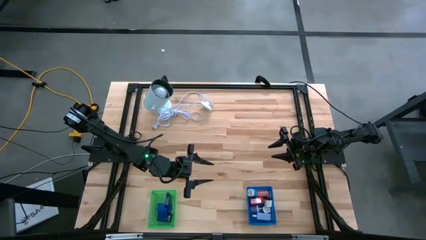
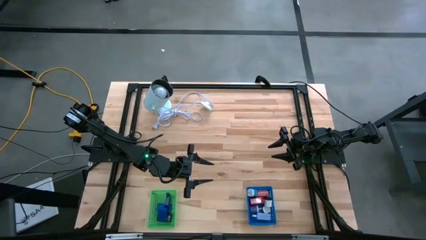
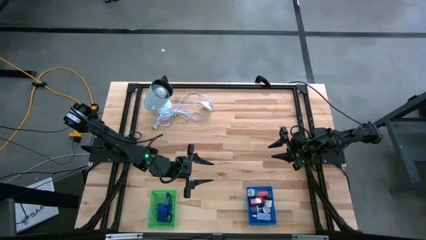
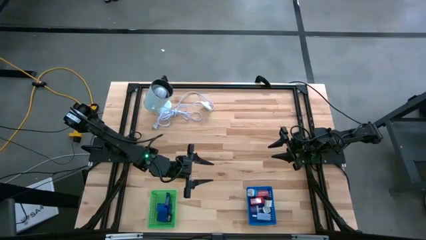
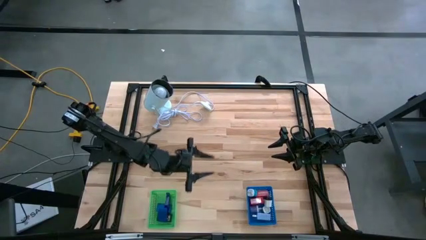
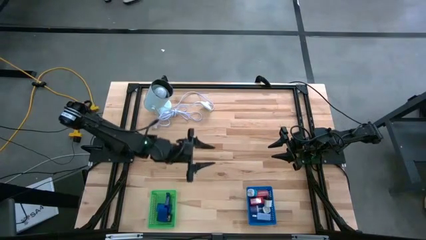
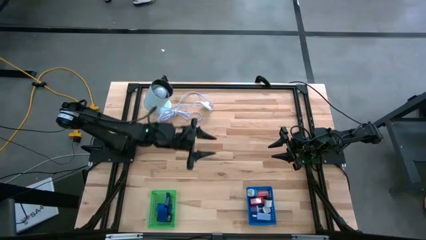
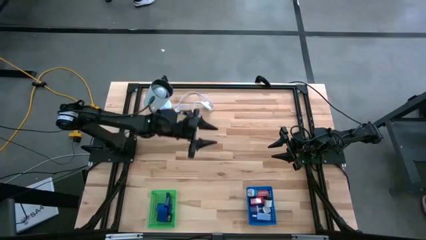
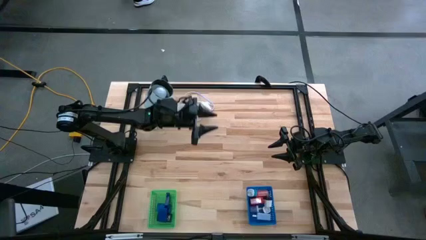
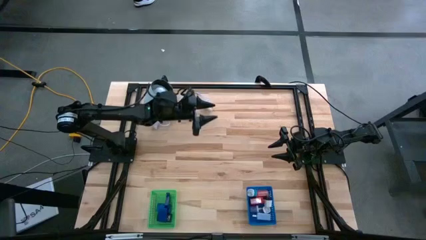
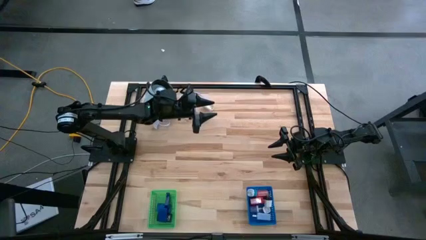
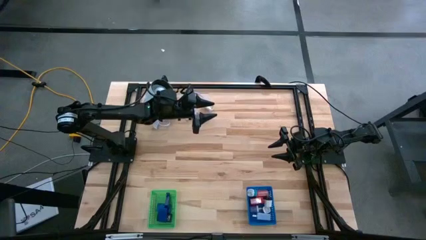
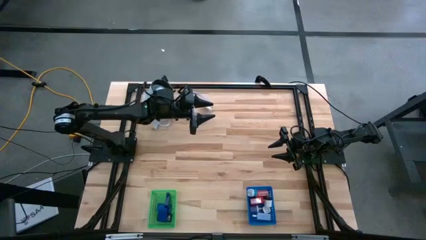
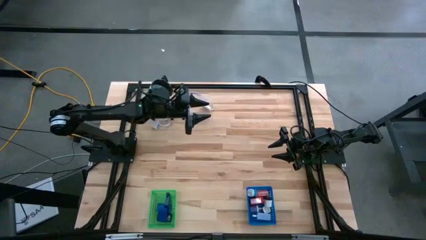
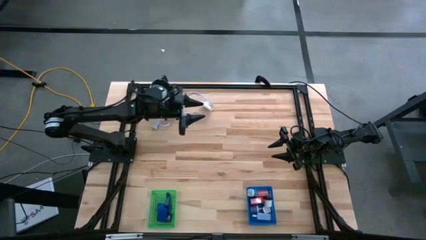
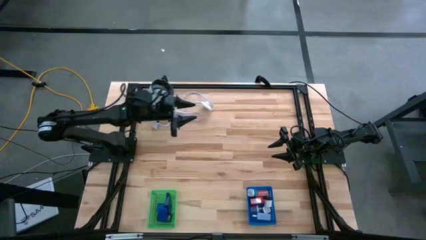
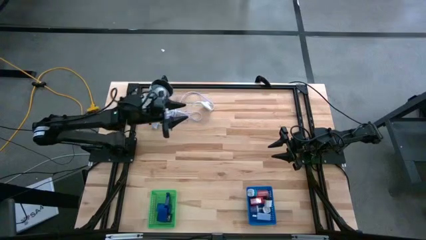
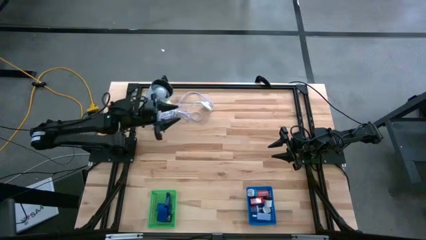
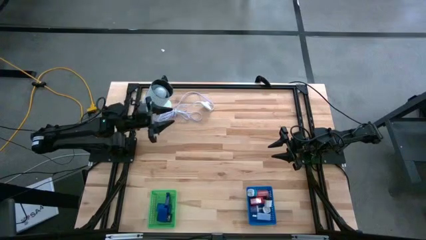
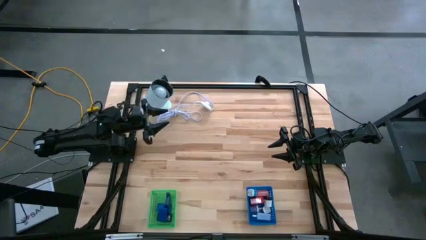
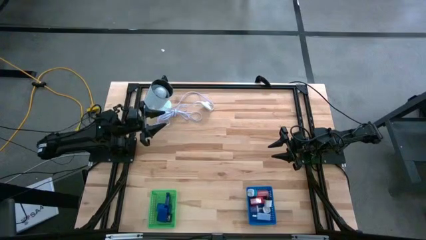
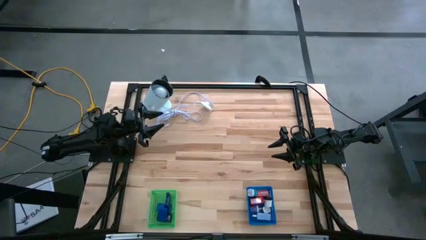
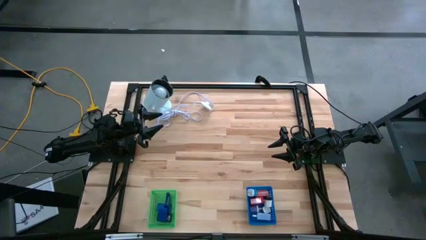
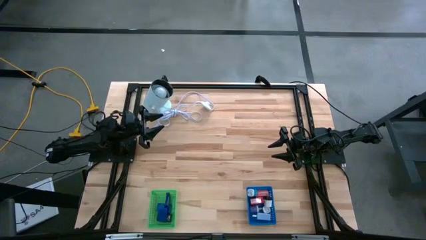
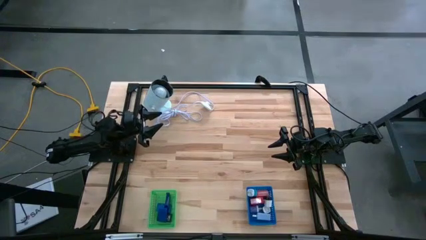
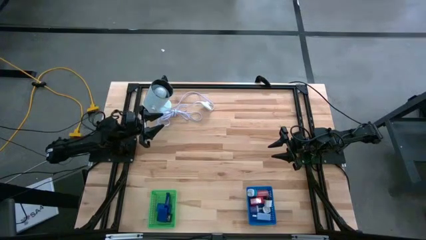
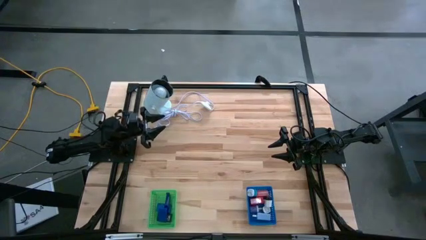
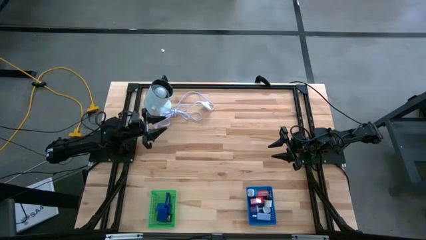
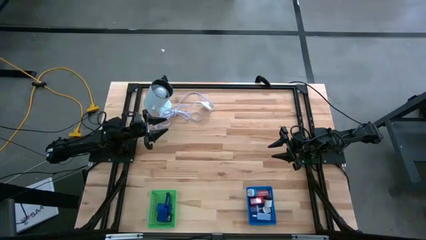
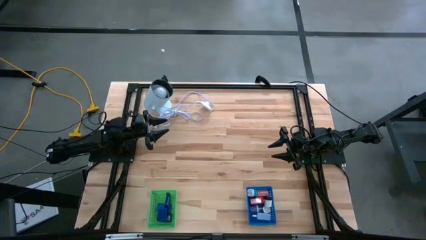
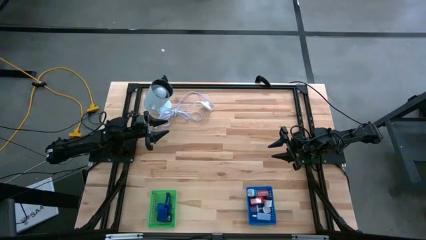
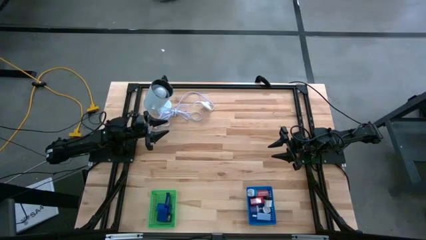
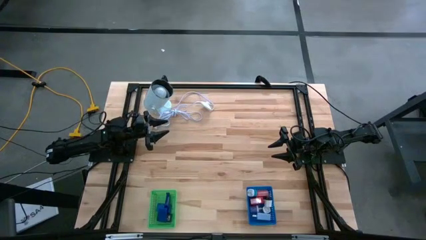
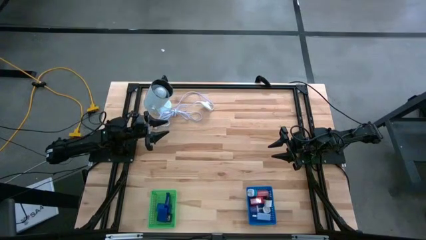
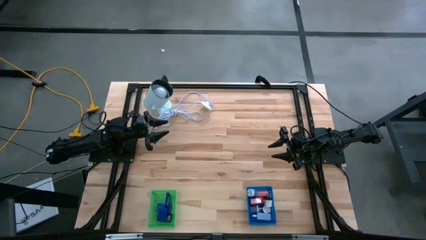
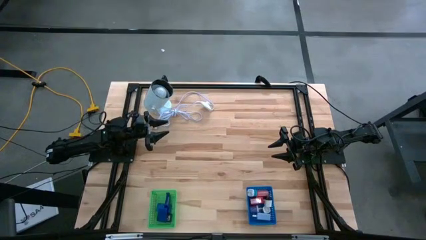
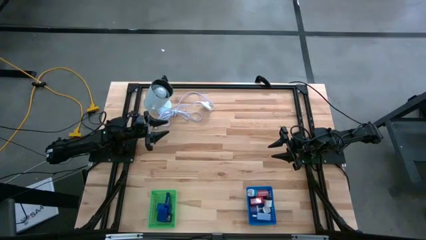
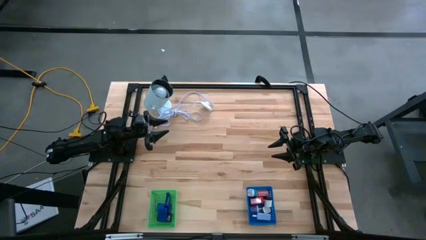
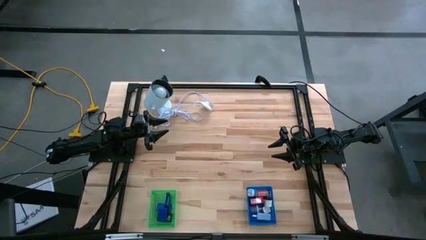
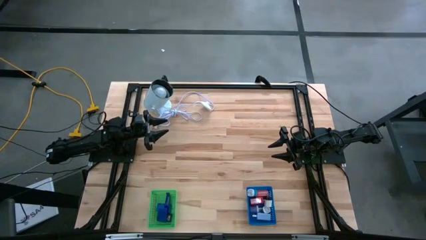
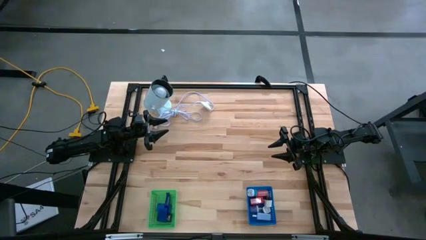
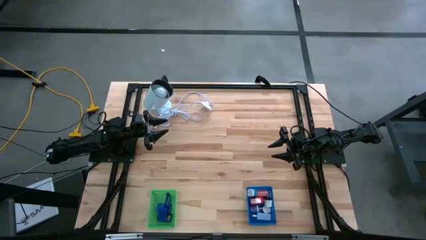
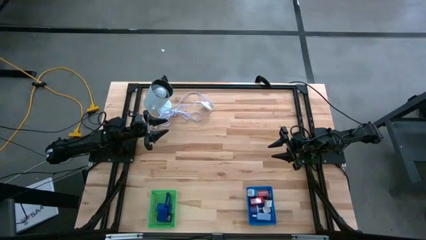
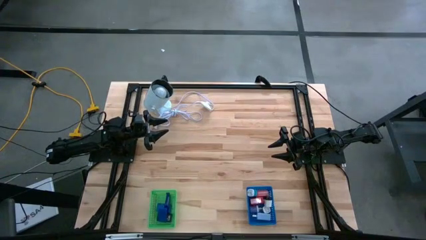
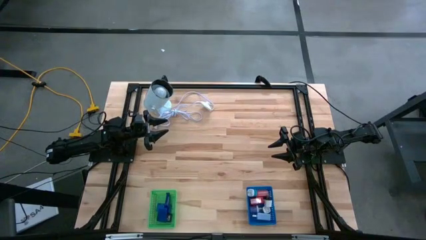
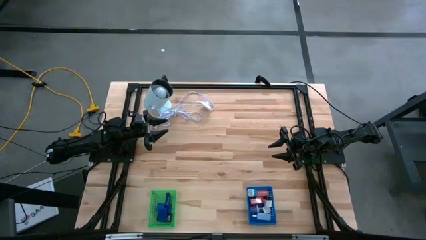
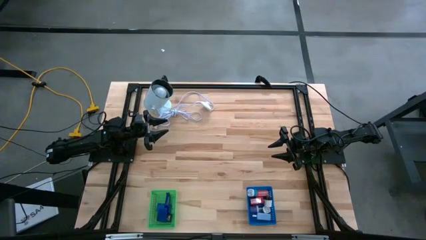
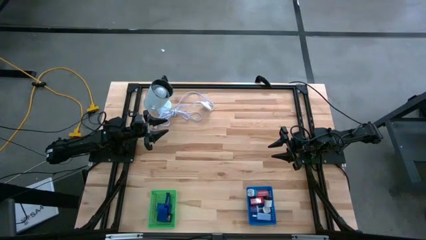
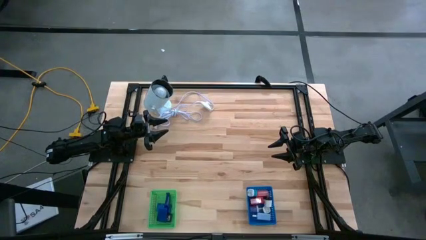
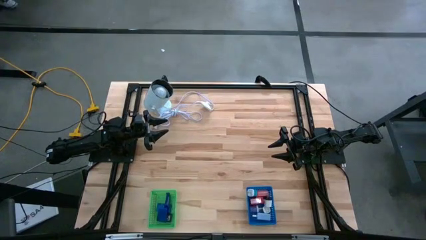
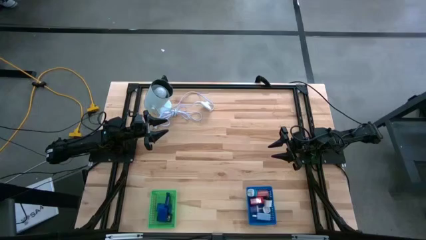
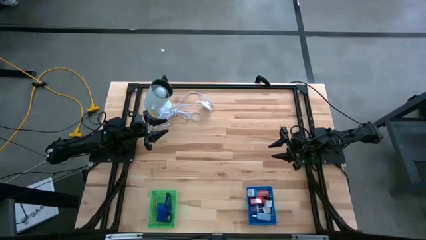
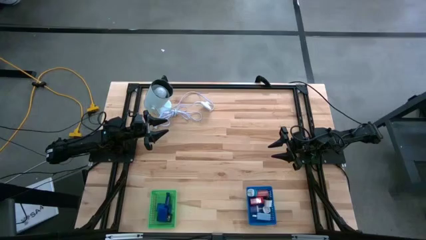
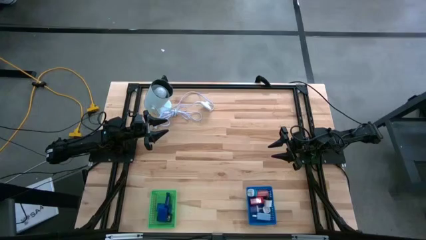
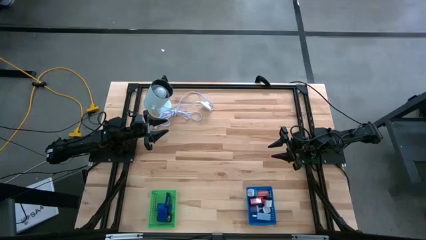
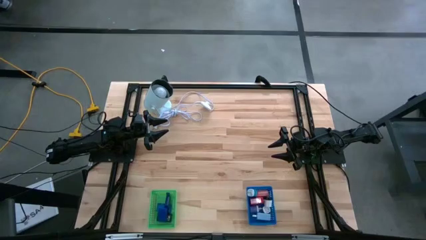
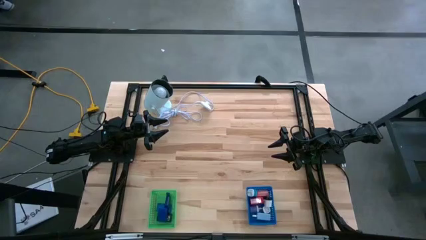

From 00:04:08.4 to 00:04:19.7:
Task: Pick & Place Office items
Return to Home Position

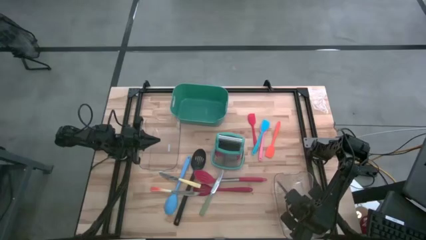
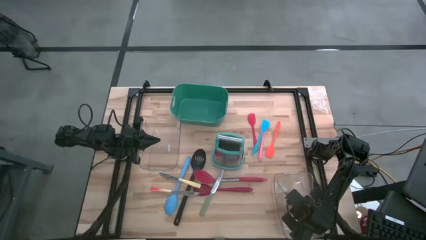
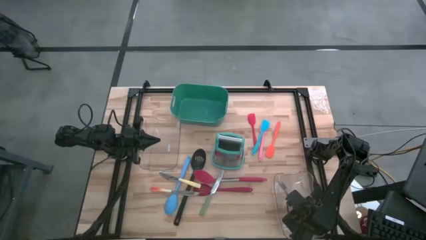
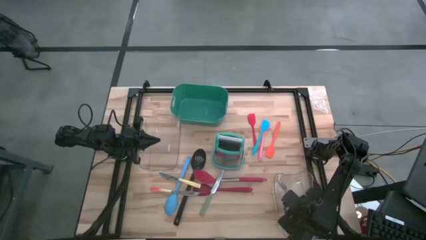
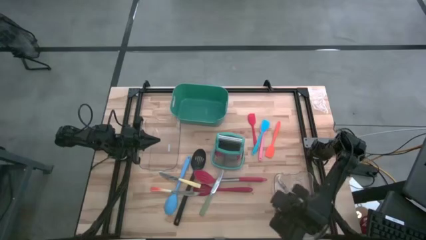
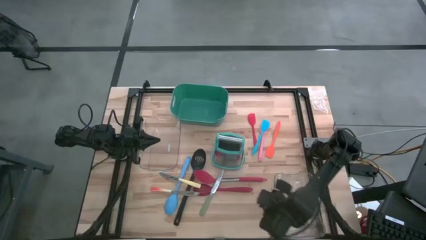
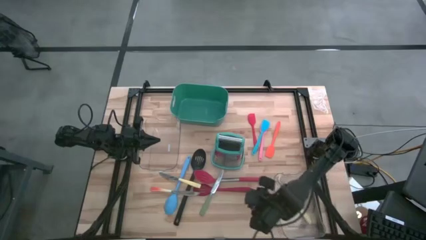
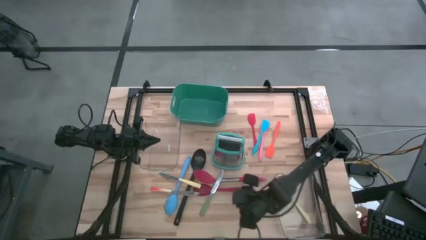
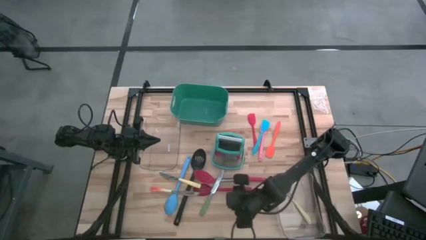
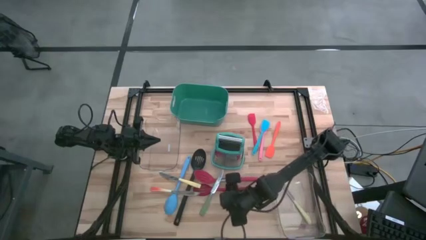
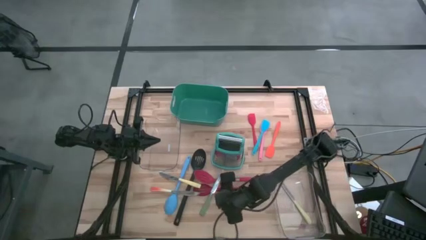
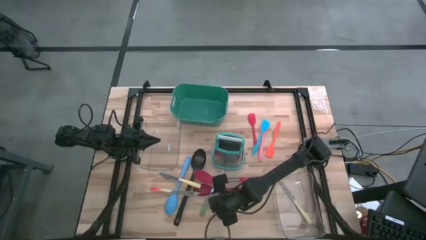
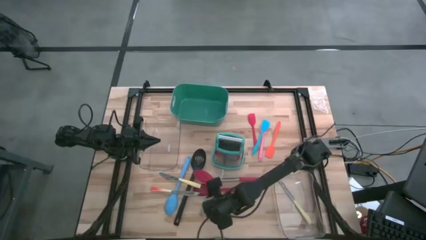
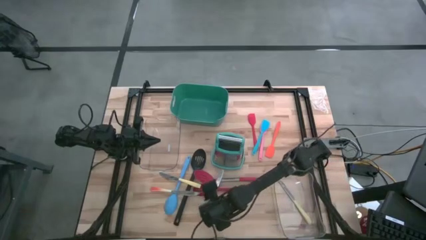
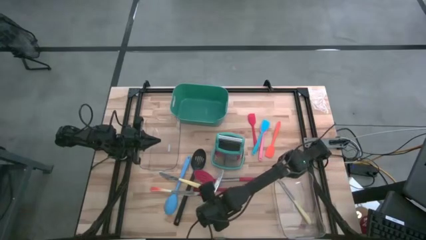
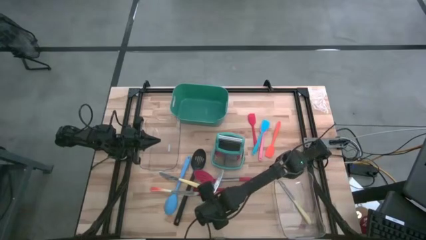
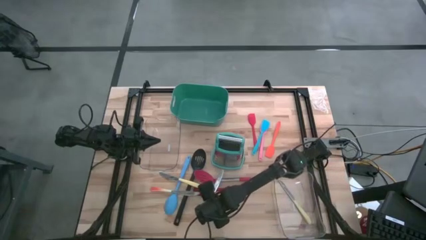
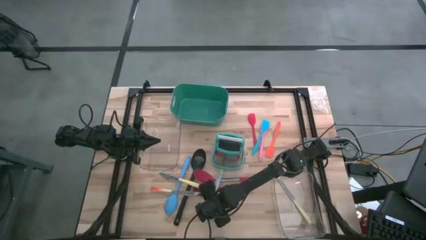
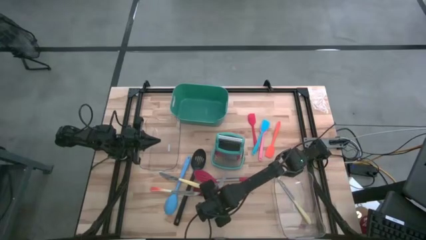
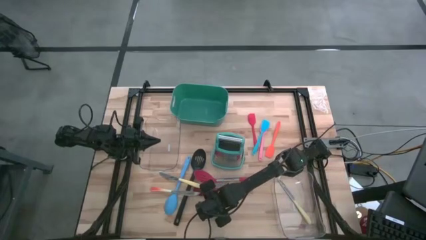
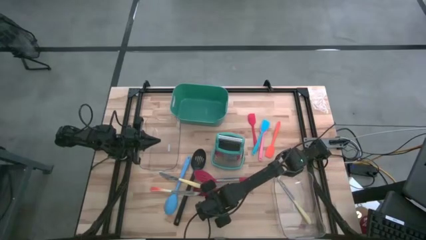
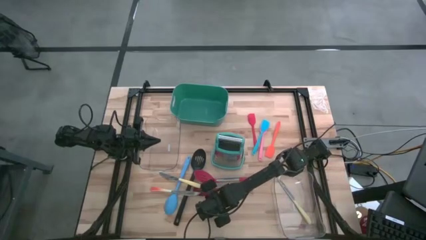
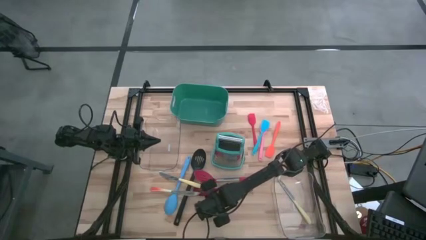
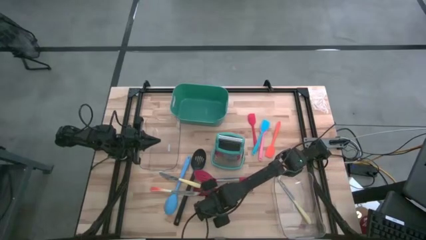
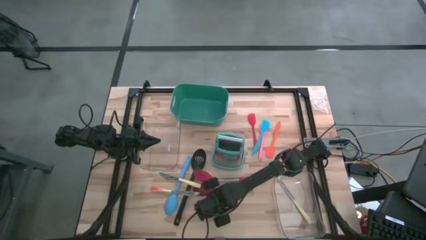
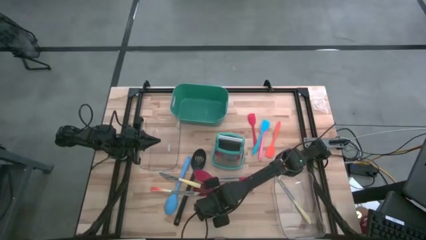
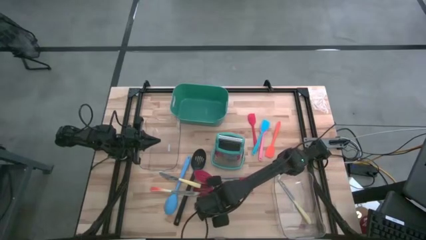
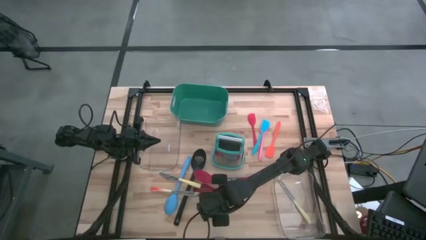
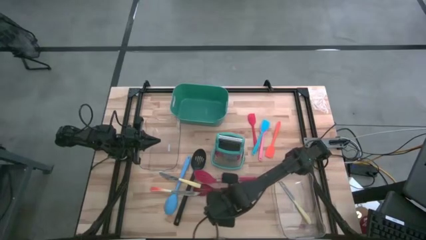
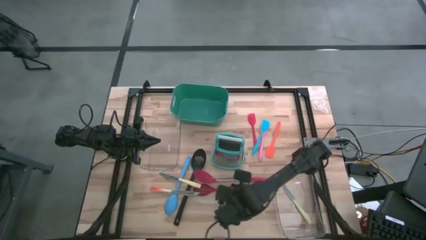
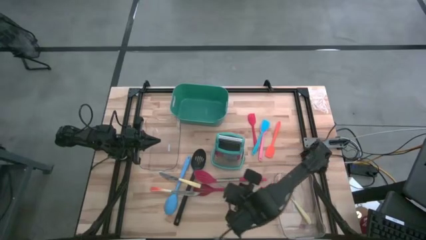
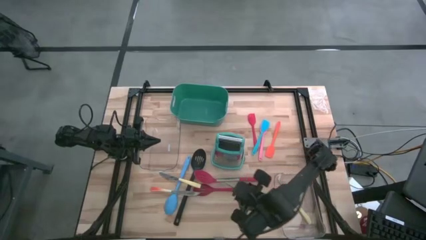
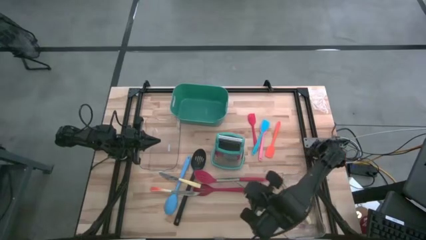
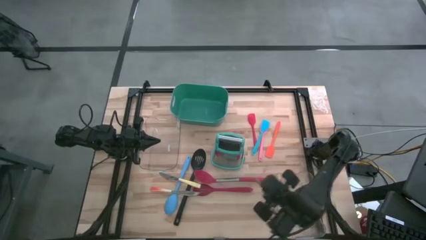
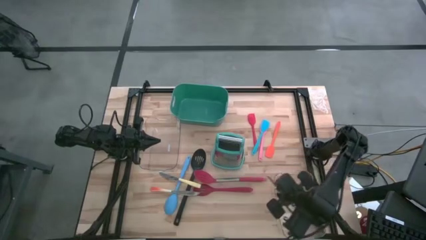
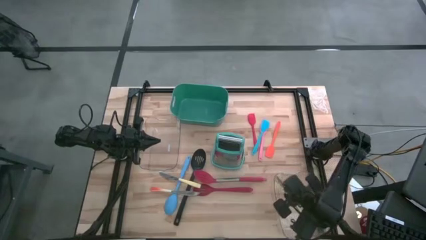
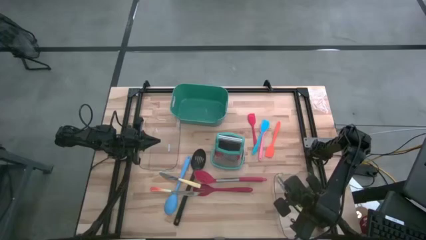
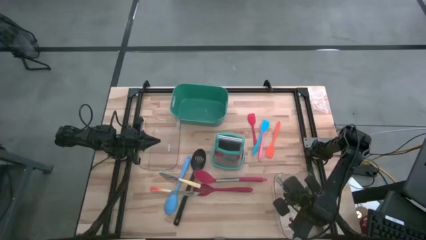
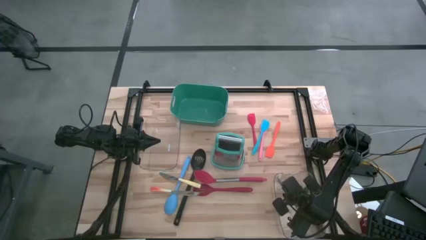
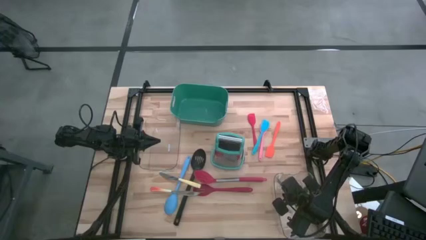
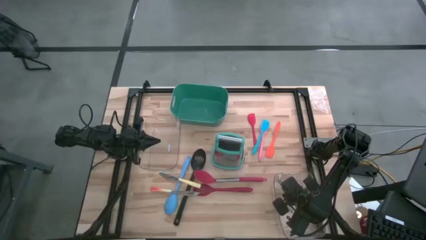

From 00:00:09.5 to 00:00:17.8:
Task: Pick & Place Kitchen Items
Put the green table knife into the bottom transparent bin
